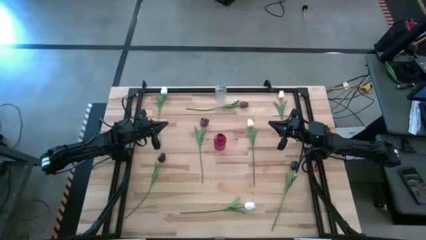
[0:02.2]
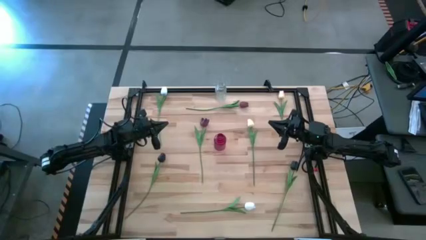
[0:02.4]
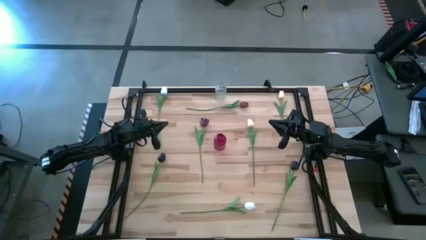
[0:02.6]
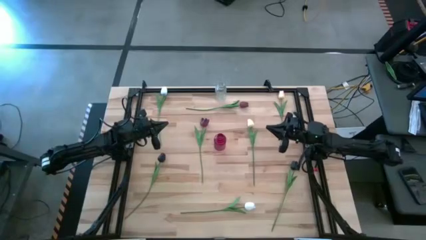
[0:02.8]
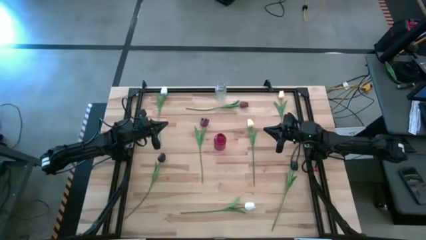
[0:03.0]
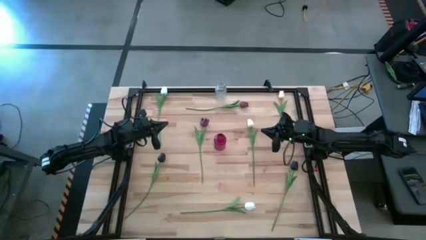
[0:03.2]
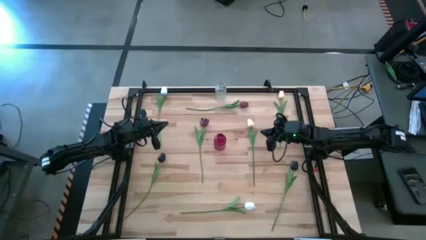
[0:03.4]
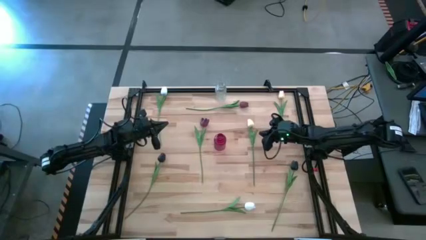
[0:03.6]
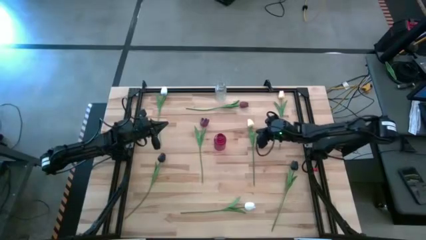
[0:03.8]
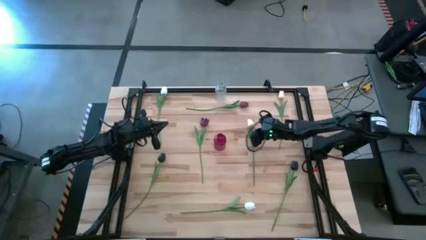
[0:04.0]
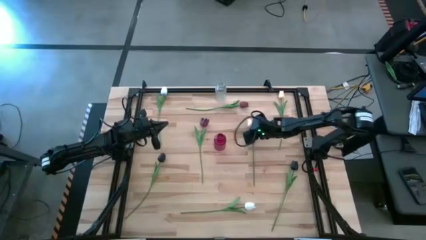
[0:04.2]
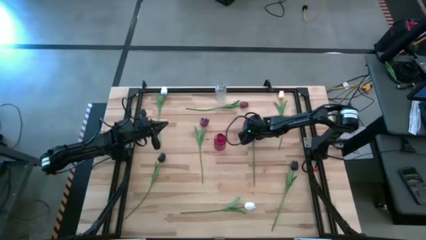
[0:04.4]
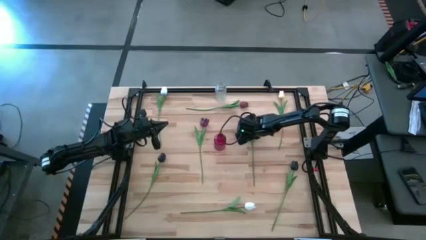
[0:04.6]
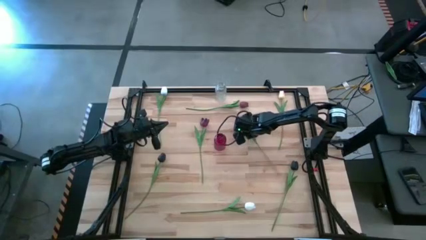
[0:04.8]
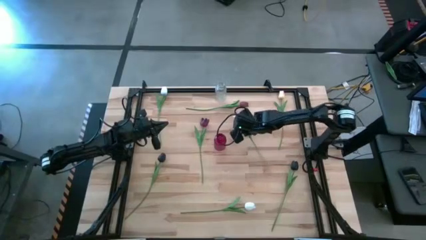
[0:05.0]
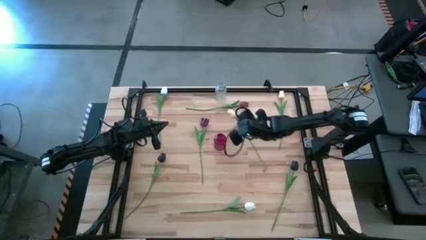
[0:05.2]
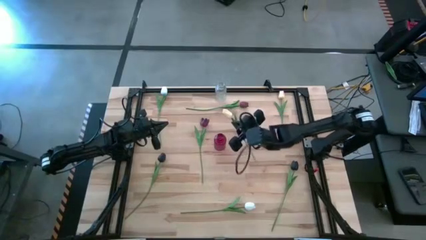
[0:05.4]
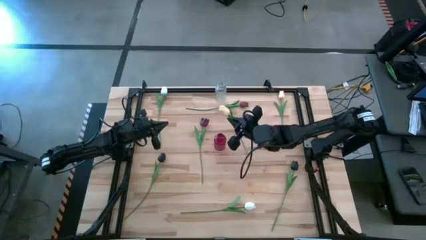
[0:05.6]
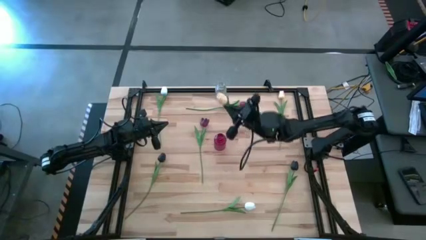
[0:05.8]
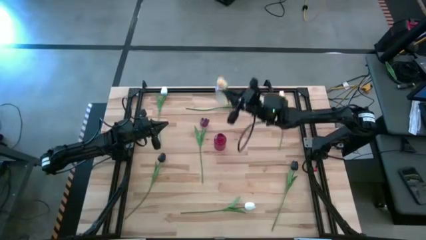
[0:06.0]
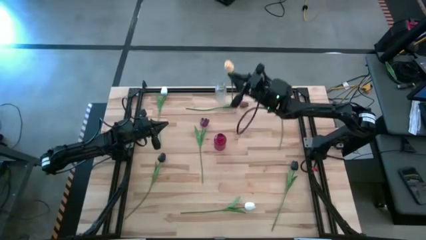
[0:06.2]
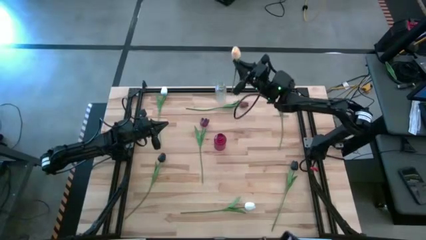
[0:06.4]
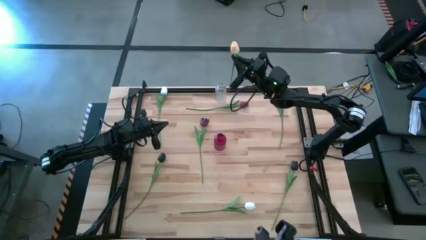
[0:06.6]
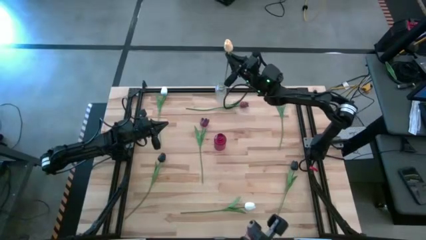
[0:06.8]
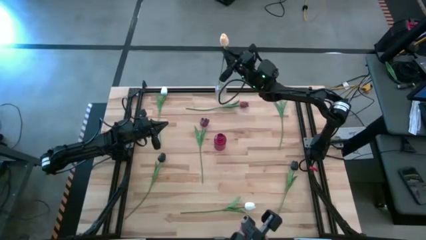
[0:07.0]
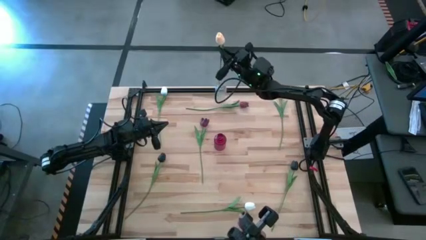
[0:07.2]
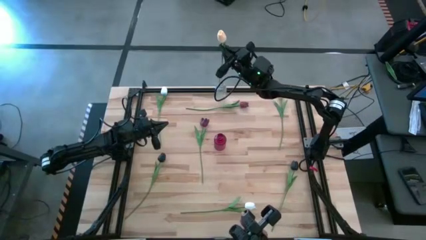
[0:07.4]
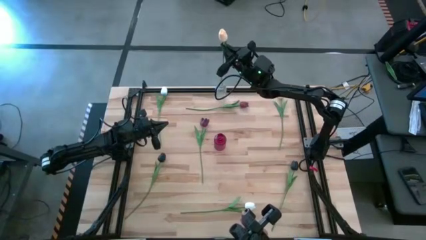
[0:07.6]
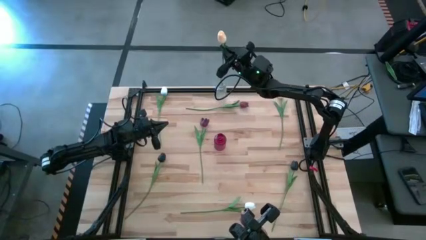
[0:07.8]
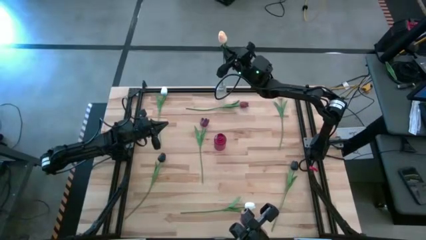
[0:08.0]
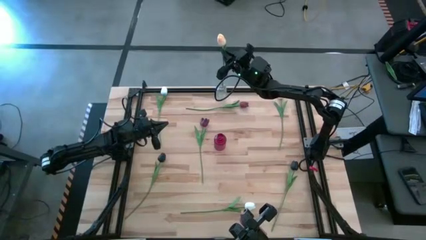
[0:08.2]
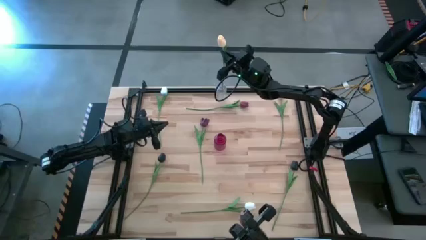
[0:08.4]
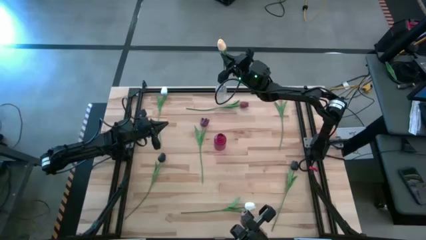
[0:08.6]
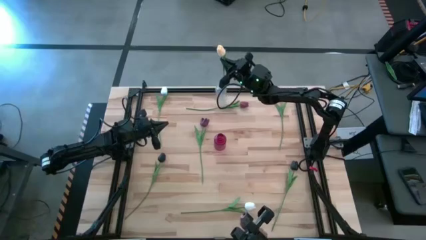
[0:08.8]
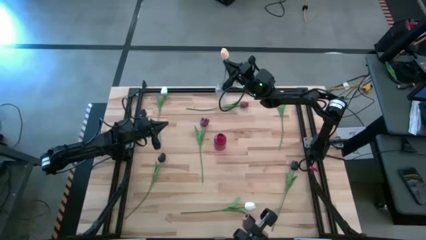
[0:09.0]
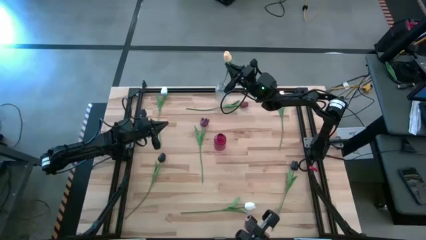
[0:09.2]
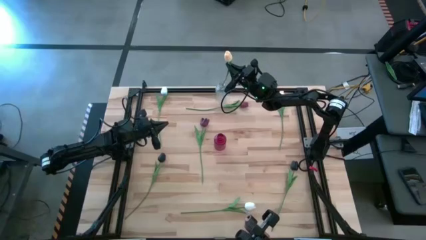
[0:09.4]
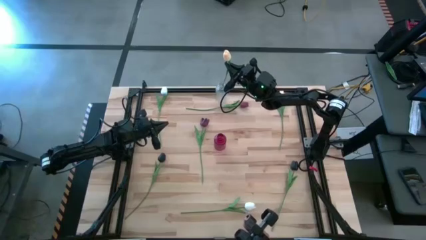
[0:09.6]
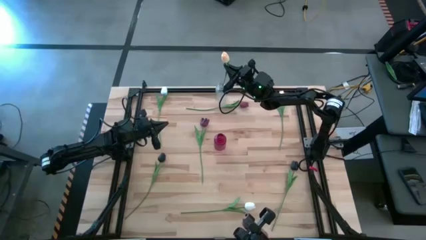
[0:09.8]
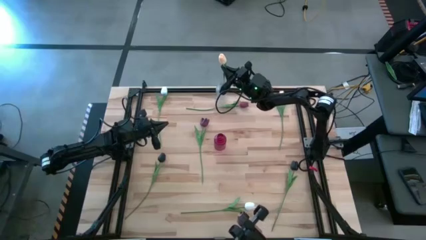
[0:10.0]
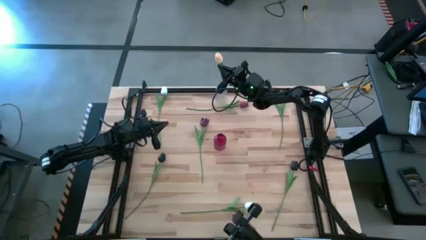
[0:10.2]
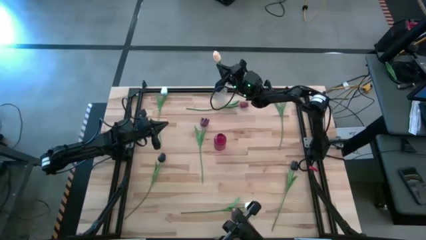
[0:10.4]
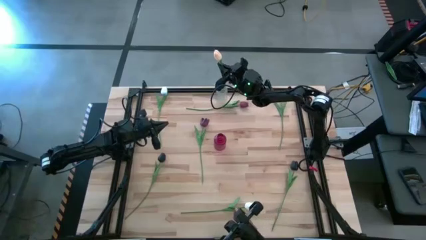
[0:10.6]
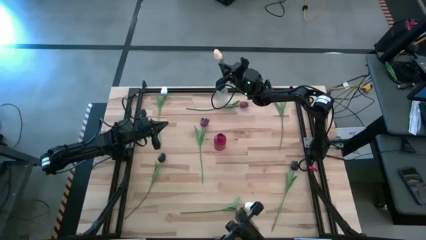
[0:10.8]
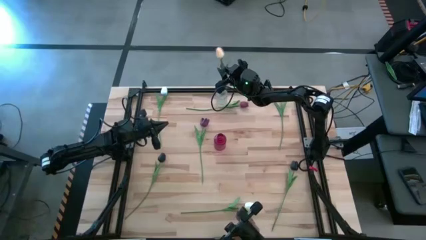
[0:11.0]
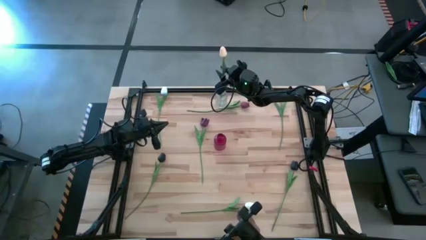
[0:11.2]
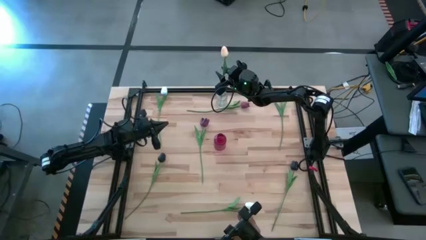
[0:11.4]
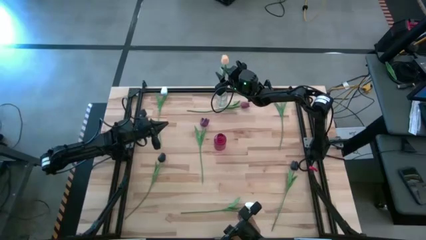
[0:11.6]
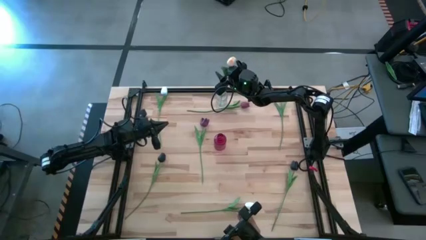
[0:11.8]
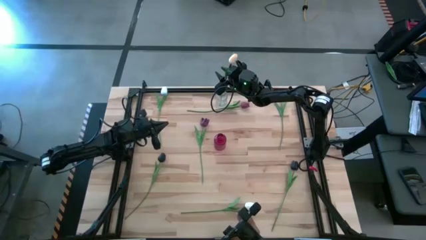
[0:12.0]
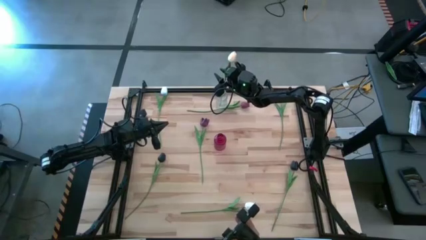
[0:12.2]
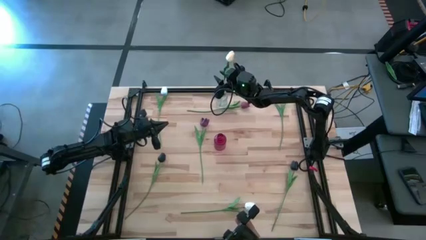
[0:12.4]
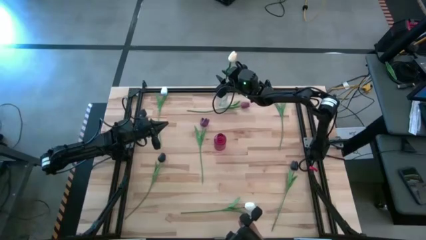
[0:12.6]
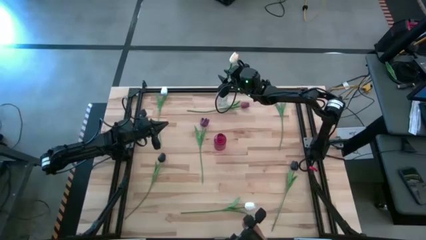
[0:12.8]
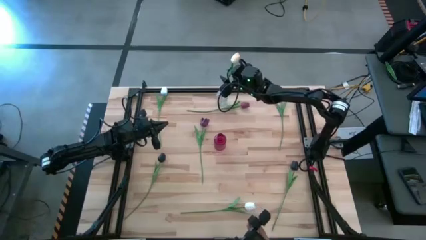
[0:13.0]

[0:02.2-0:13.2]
Task: Sort flowers into vase by color
Put the left pink flower into the transparent vase

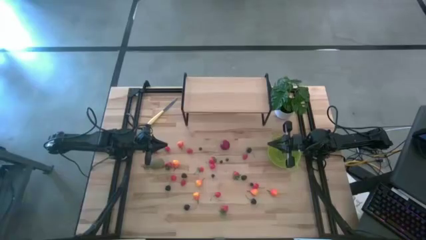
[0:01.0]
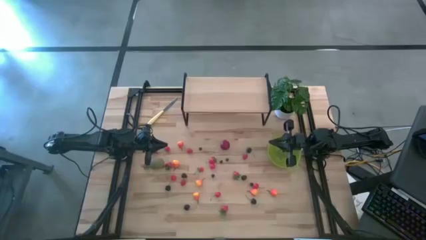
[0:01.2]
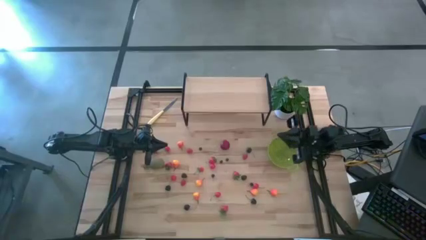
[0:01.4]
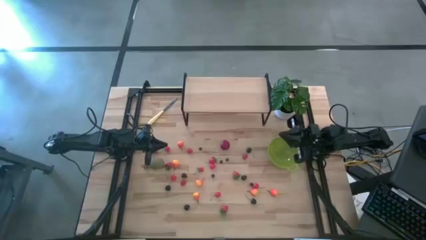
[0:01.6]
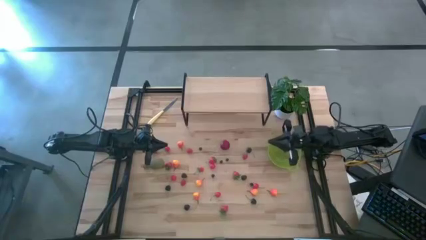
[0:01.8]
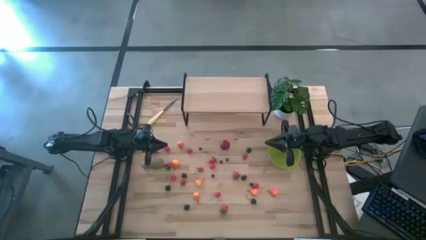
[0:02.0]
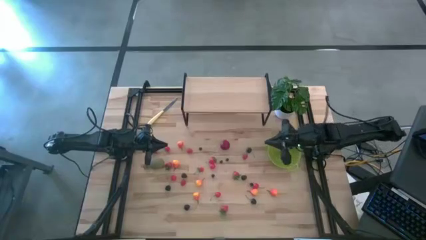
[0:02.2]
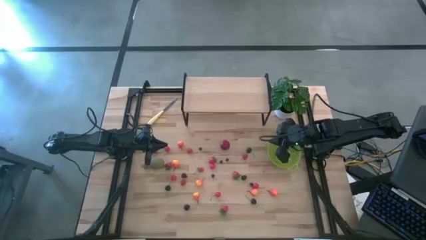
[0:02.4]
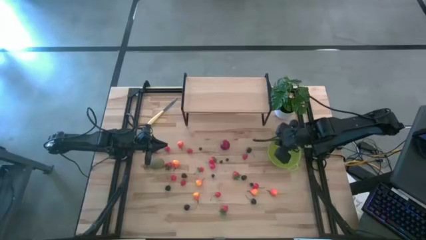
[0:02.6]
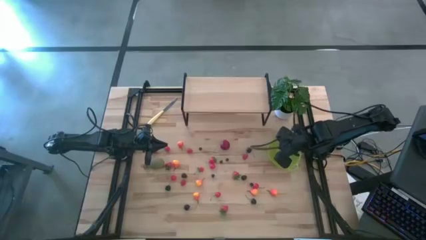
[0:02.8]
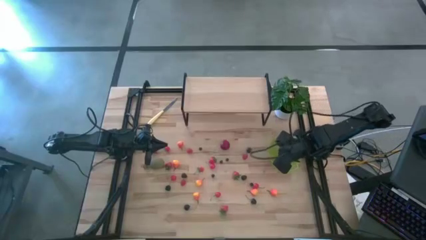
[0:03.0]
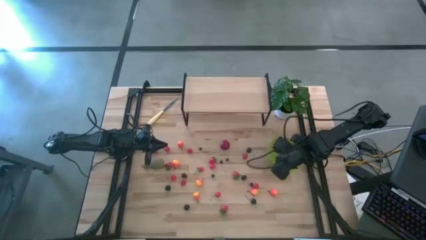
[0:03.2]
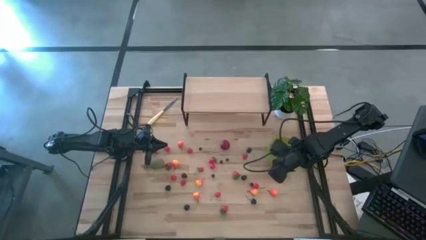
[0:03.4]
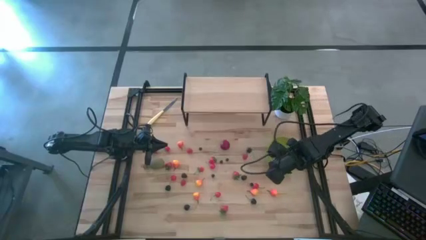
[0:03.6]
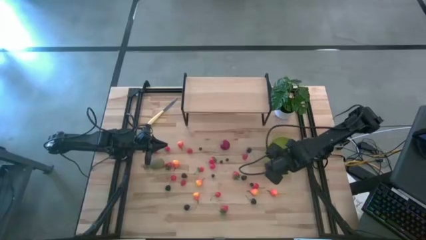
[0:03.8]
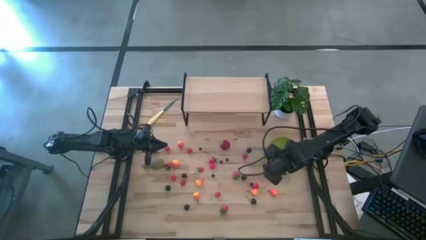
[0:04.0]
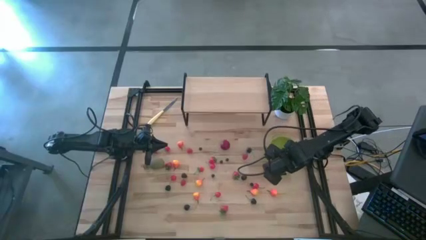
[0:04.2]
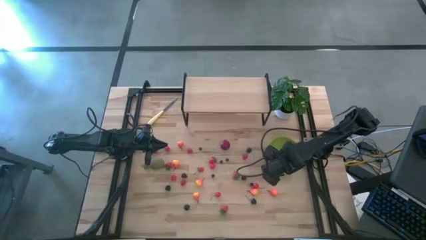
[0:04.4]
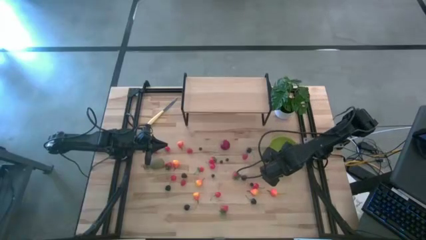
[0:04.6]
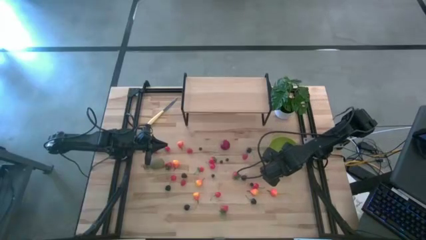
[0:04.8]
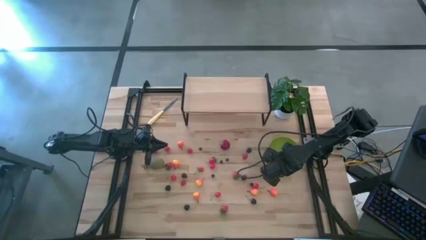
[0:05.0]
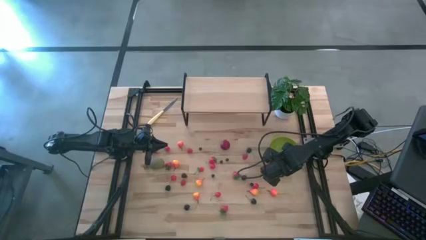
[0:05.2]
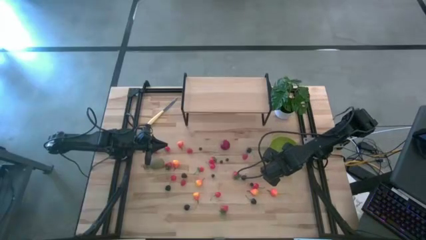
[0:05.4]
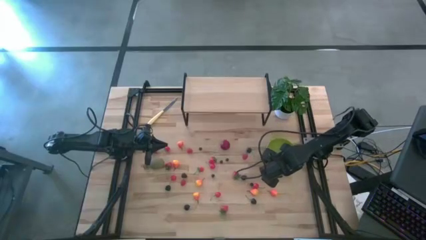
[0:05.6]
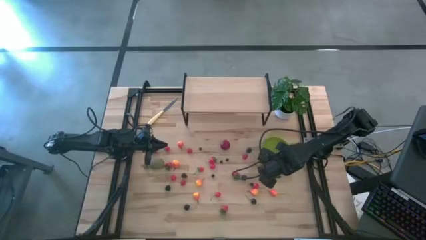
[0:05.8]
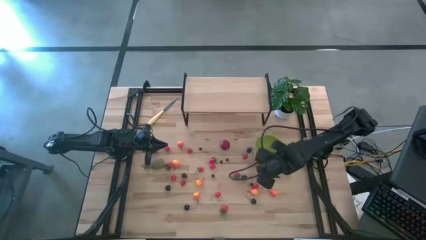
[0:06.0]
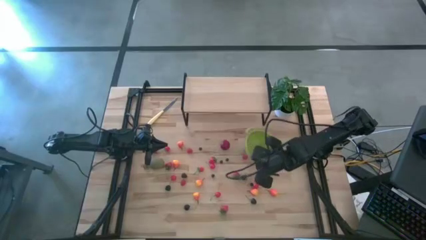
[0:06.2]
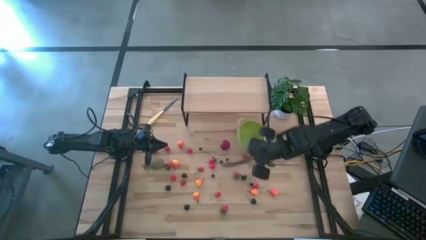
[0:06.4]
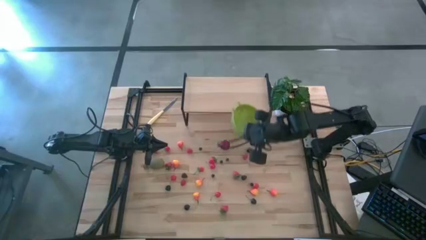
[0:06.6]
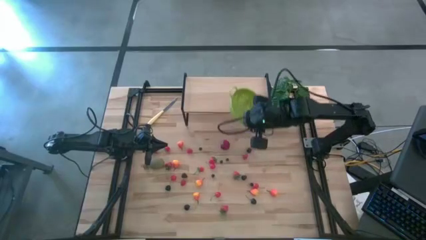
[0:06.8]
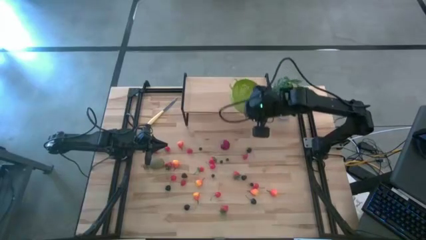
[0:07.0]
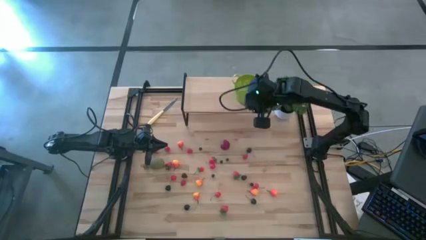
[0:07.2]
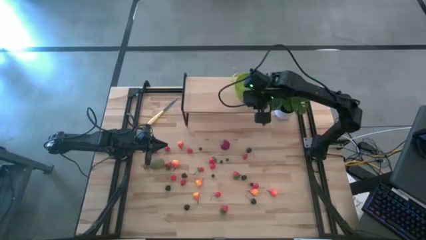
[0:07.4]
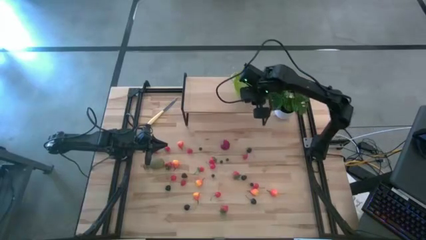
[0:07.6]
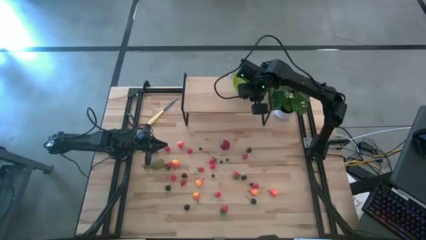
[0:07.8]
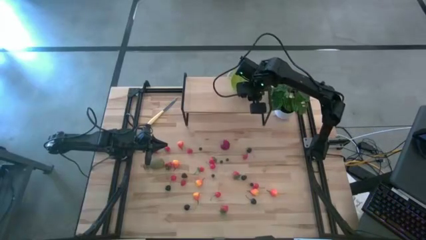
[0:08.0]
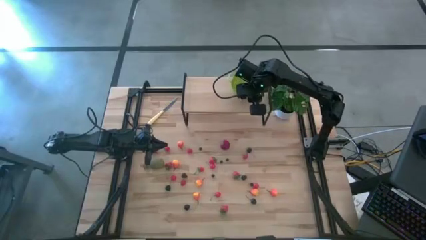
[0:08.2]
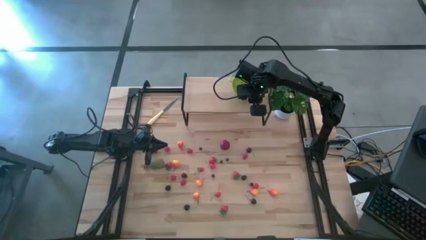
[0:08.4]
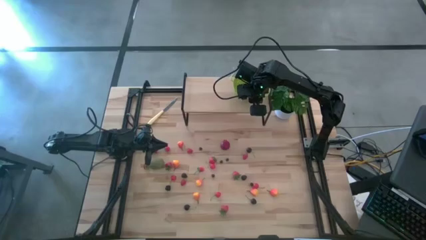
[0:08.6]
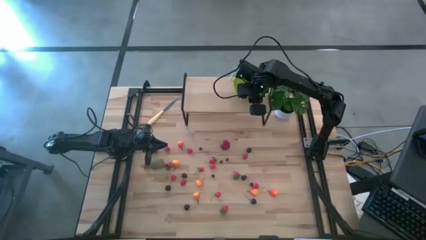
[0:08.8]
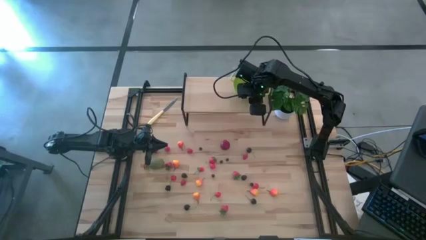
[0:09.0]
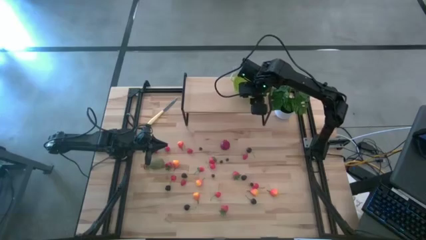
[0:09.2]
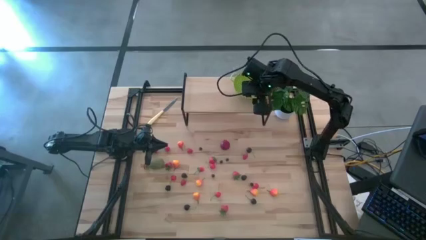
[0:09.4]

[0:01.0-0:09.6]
Task: Build produce basket
Put the green basket on the shelf
